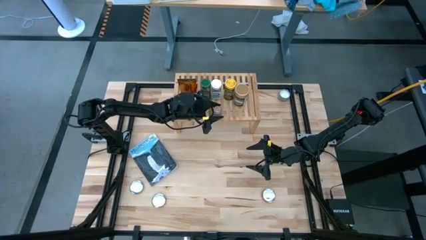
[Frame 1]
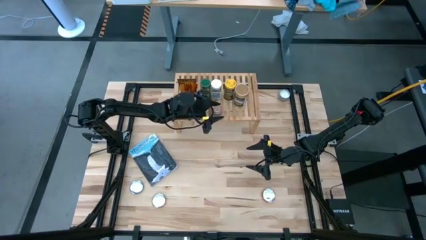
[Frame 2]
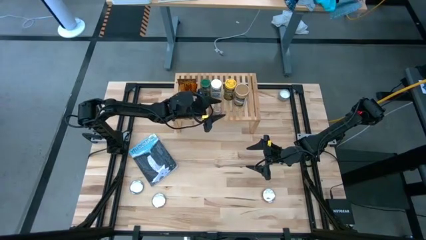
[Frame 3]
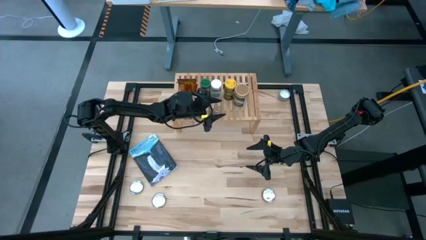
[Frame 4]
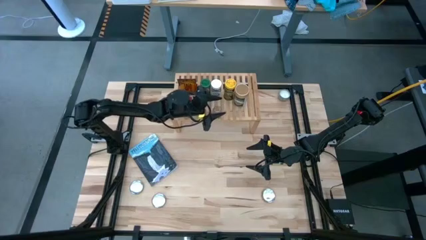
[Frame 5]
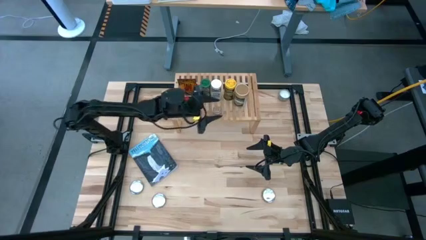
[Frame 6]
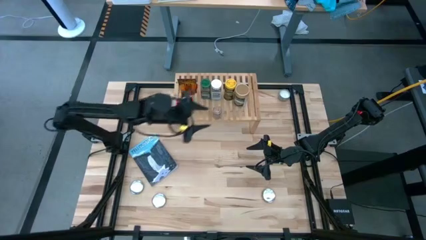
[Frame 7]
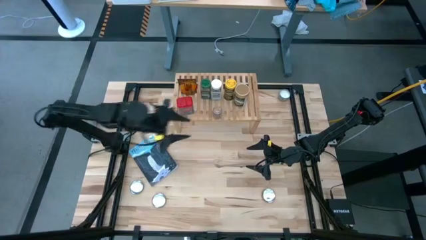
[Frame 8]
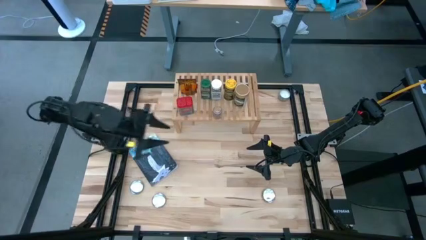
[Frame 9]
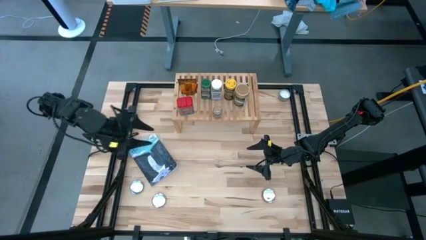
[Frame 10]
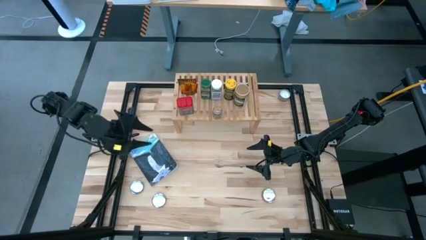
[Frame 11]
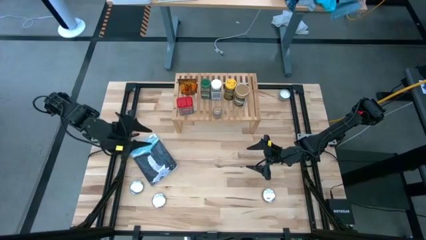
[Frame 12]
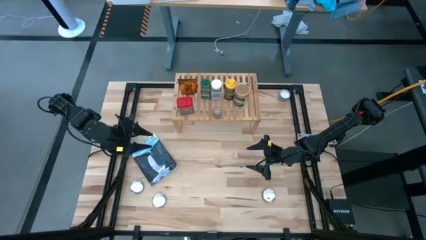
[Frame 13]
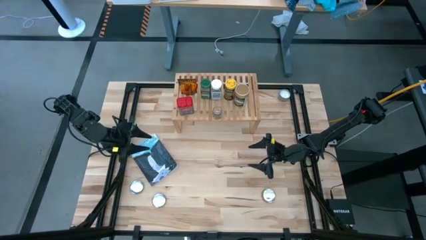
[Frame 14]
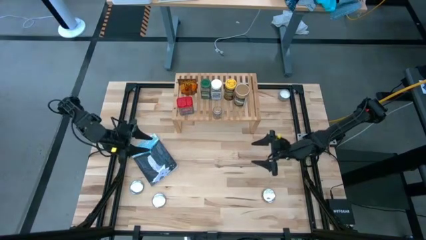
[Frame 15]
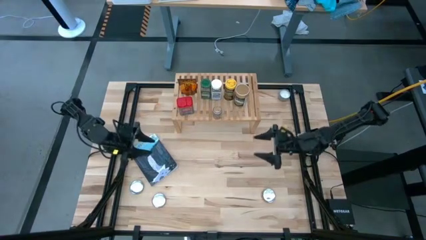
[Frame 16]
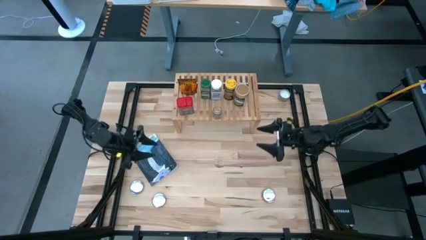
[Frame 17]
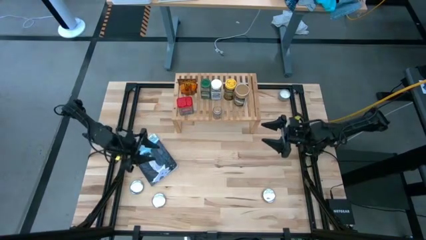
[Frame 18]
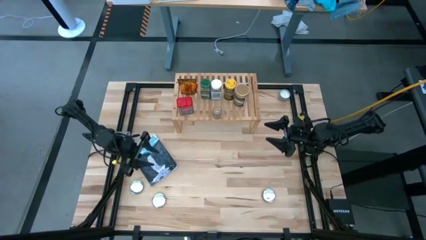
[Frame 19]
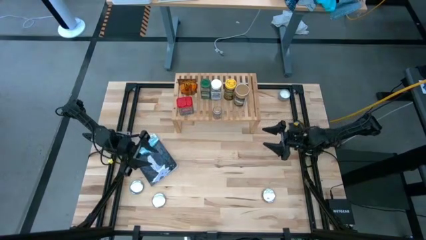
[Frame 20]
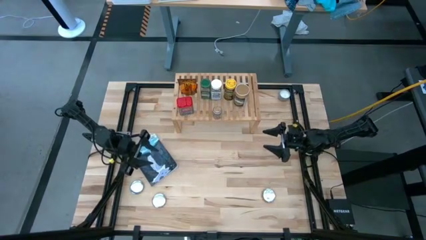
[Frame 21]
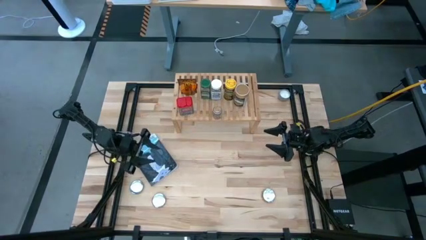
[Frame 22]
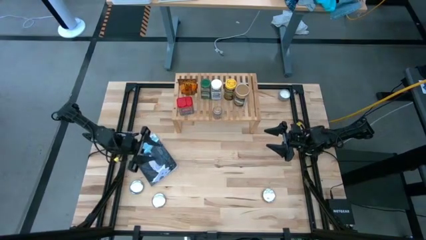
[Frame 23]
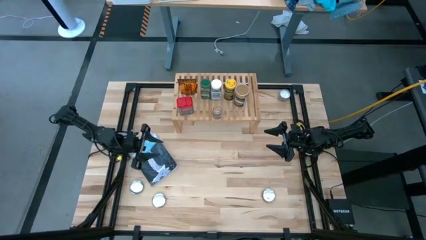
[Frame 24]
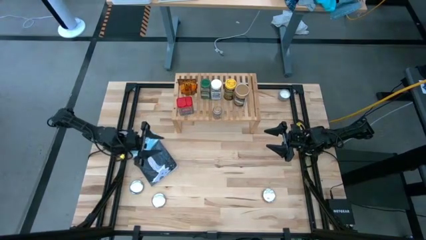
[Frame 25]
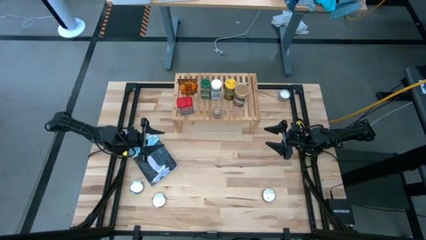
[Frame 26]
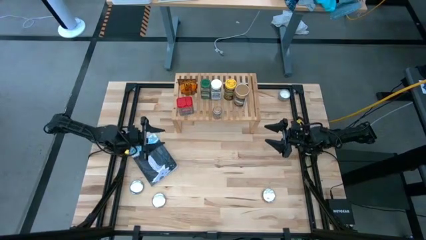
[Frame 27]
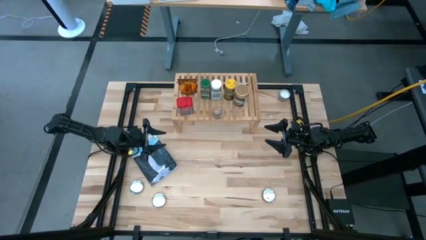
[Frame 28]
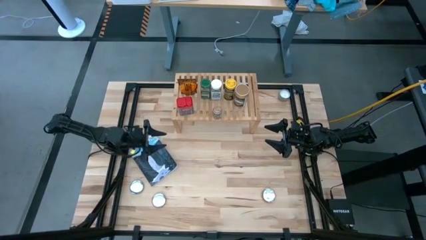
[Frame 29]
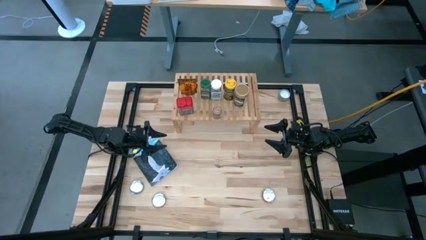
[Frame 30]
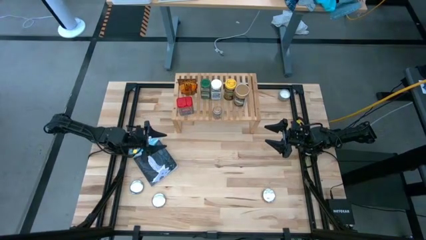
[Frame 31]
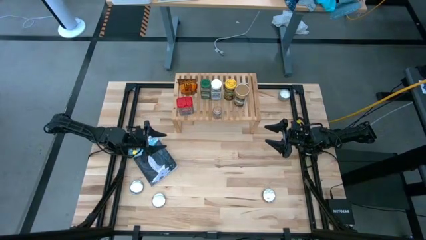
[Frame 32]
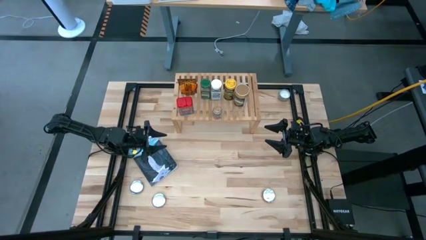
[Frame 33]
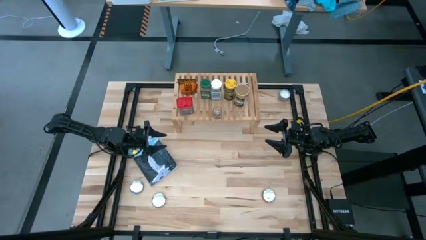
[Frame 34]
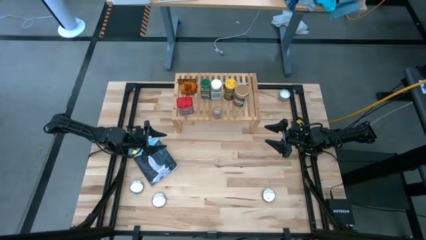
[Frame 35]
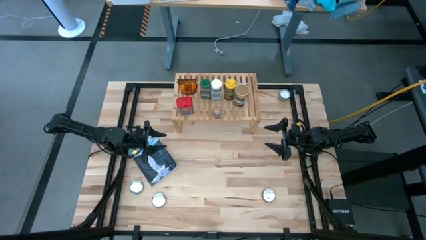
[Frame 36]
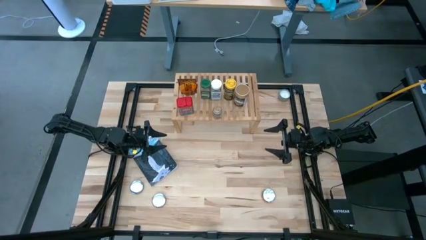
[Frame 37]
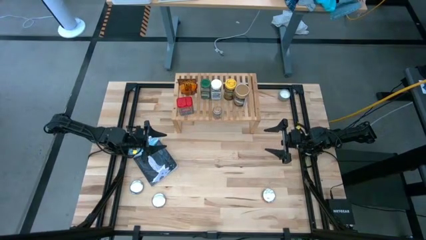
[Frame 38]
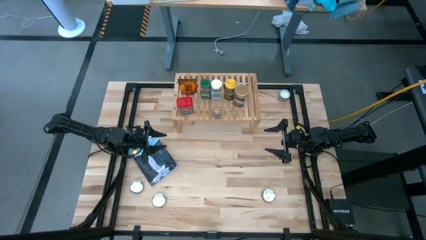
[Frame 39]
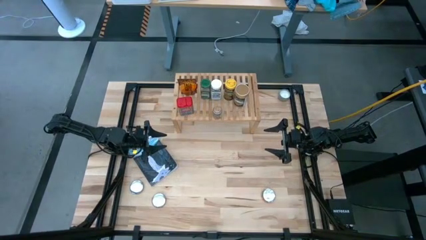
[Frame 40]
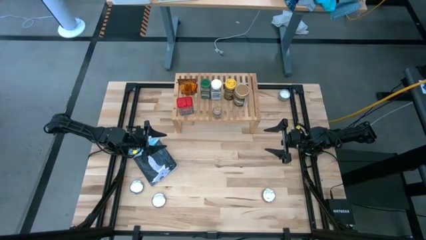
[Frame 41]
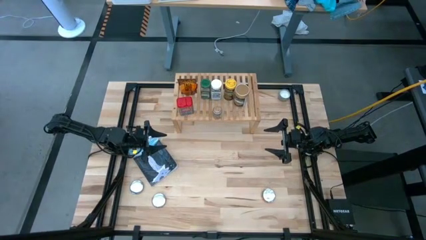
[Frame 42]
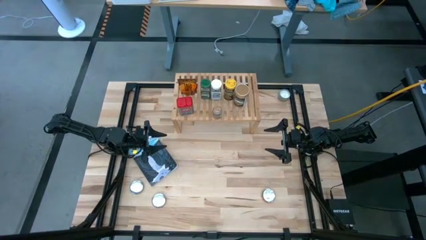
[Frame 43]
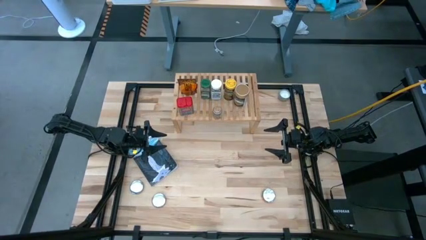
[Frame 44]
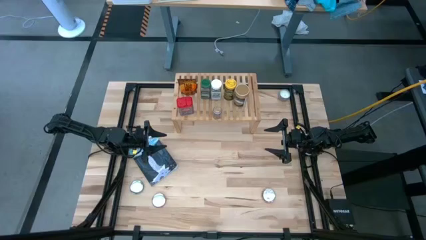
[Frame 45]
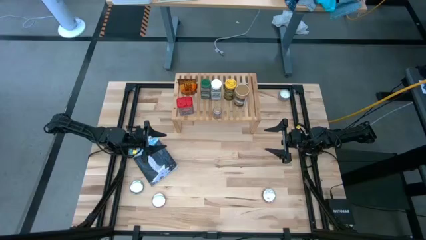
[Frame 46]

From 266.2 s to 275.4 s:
Task: Shelf spices
Return to Home Position

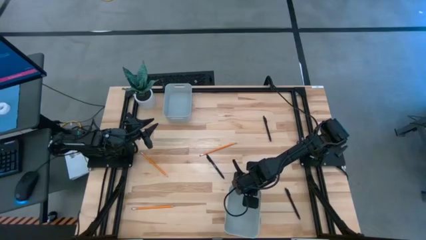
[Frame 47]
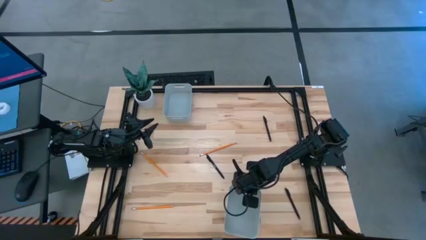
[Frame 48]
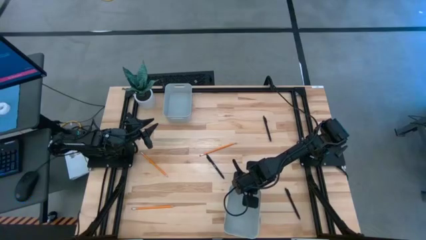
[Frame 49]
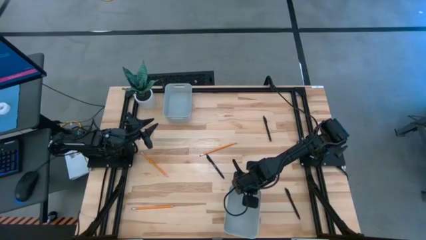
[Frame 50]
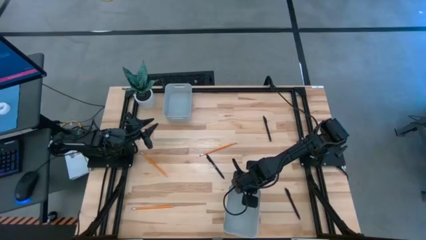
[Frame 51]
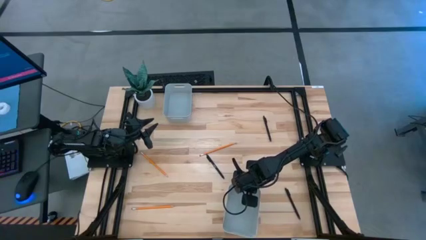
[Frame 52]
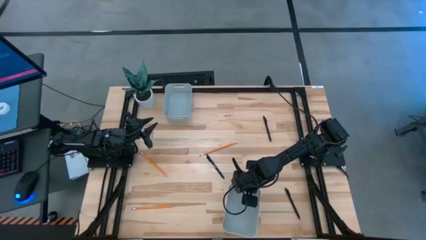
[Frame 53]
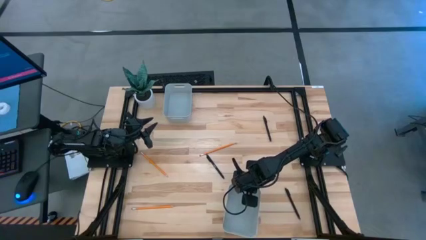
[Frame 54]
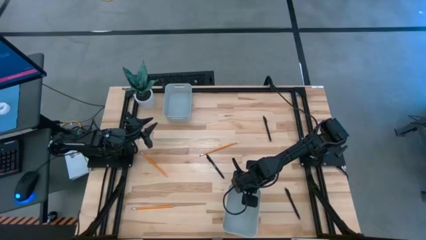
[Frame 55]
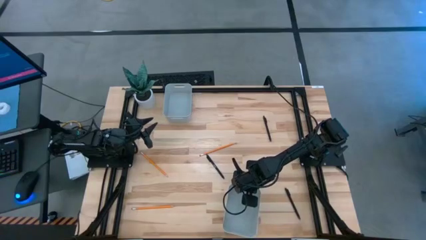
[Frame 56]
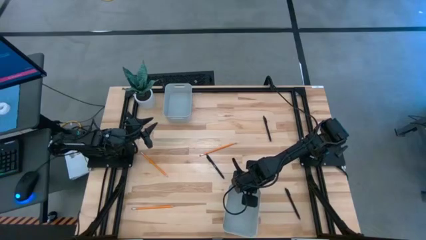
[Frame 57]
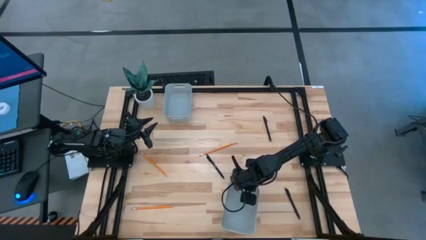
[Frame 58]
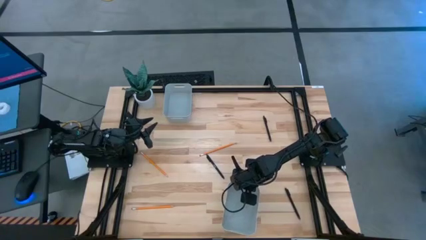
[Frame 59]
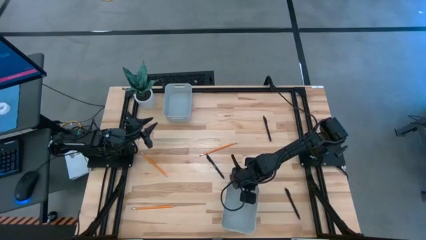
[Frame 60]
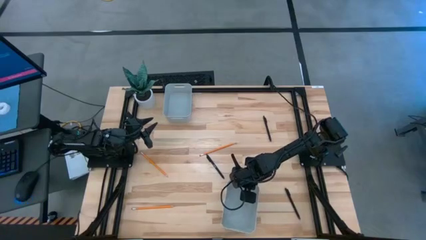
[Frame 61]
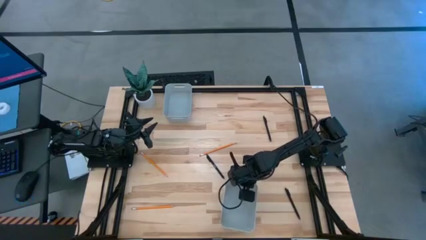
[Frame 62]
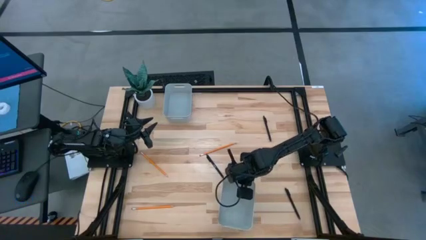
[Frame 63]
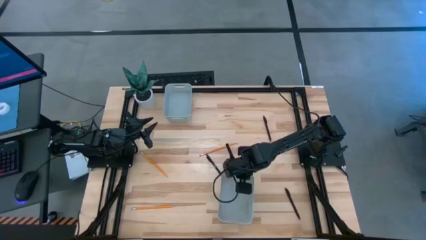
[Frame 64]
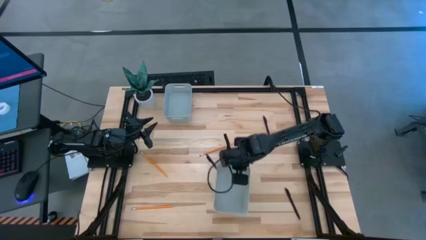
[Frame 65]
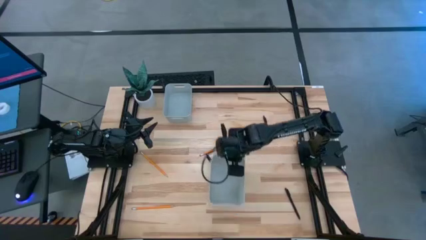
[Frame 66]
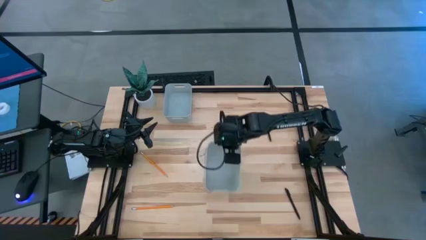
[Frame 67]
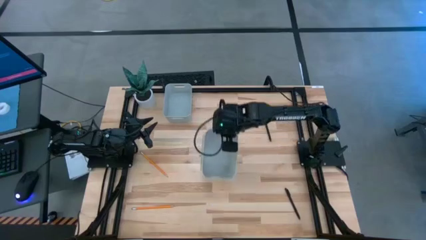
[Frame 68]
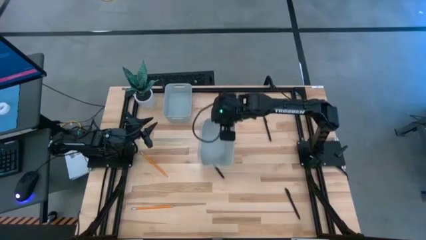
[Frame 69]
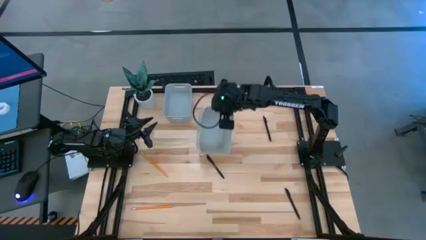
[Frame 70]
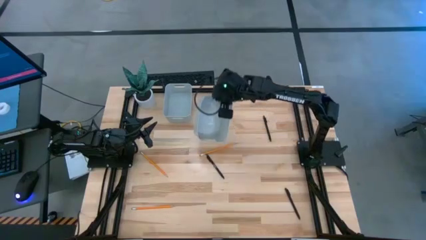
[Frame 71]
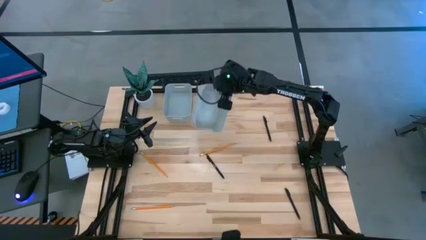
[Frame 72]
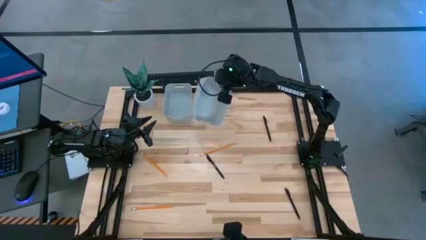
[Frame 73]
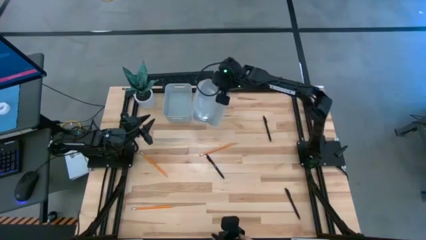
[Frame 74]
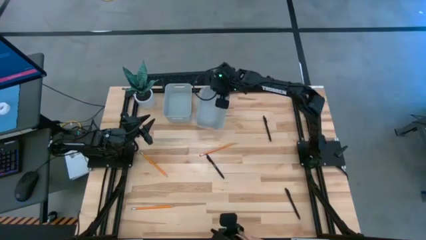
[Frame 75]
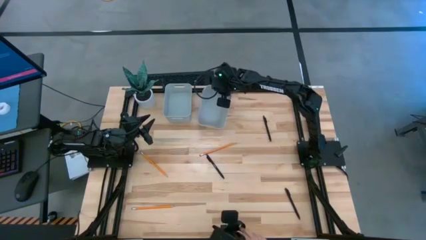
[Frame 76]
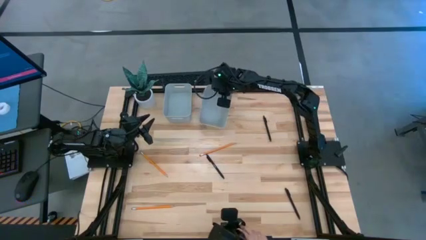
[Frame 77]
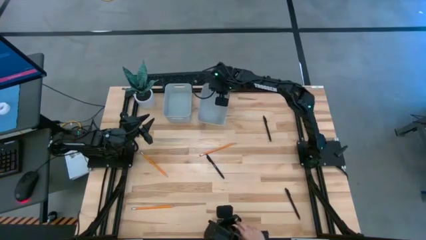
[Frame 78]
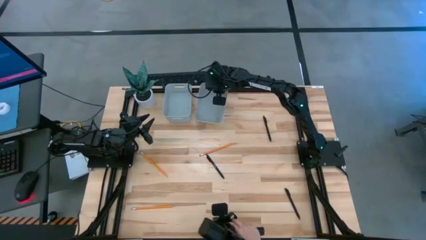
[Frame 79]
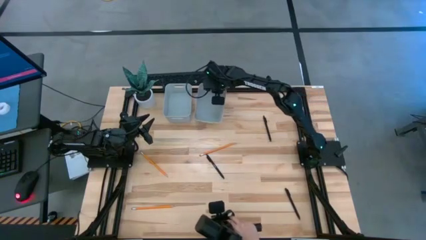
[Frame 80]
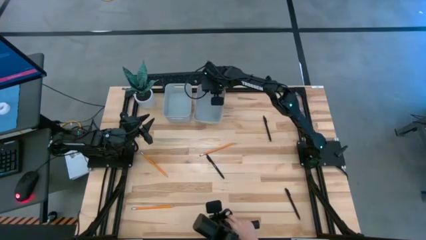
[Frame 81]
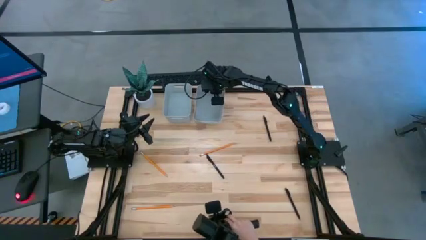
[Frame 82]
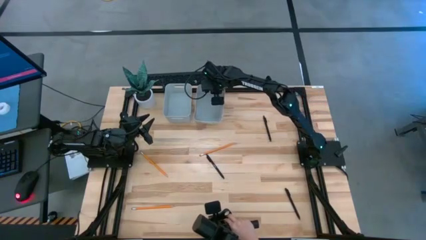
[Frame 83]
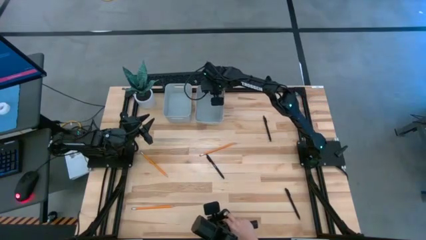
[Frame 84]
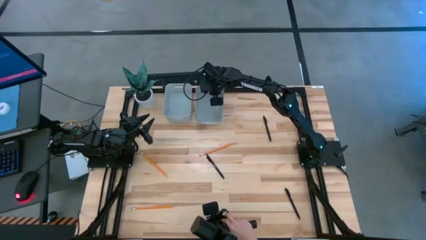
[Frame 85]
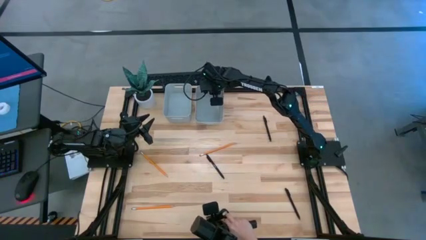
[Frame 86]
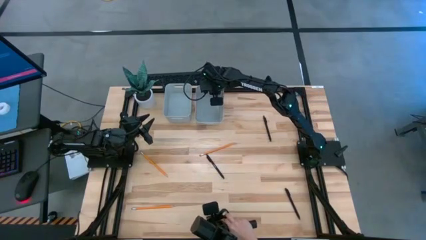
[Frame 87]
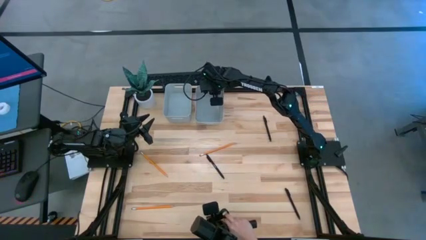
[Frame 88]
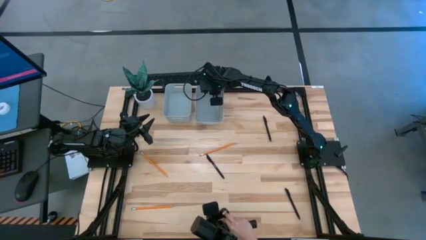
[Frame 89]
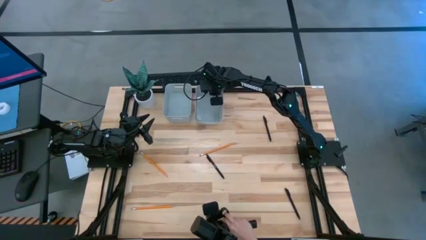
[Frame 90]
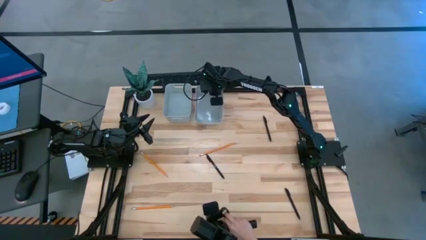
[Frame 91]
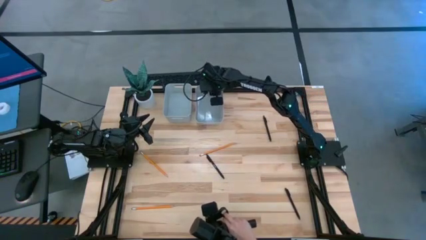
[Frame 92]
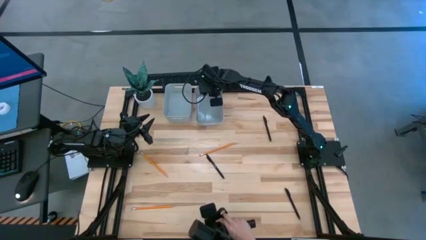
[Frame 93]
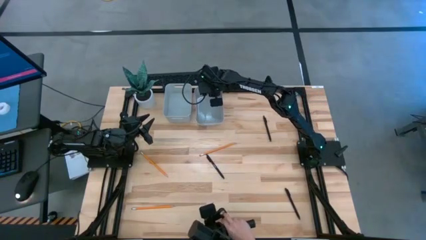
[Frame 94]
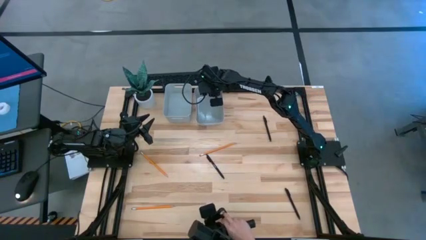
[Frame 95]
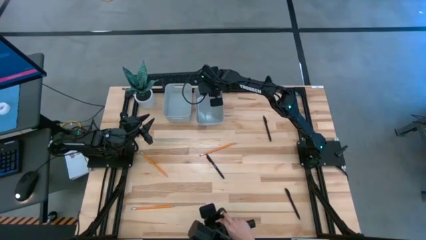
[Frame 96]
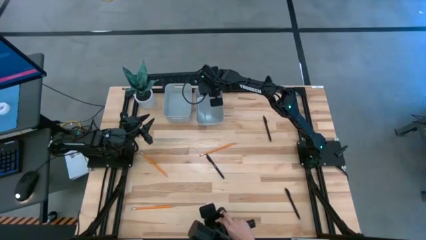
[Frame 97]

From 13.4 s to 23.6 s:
Task: Sort pens & pencils
Move the bottom white bin to the top of the table
